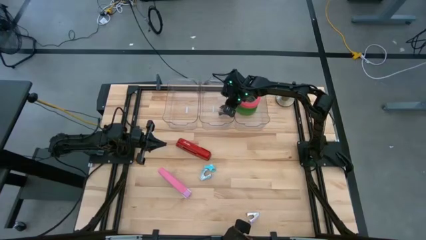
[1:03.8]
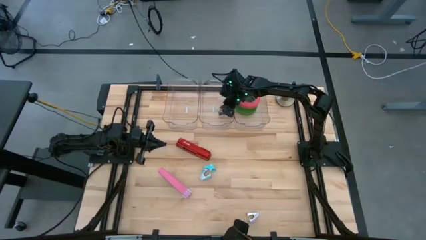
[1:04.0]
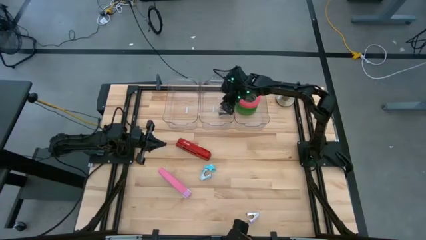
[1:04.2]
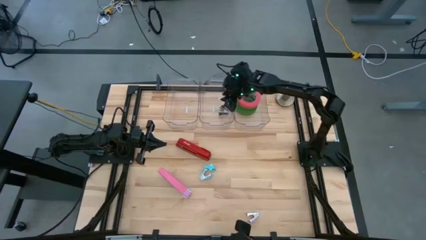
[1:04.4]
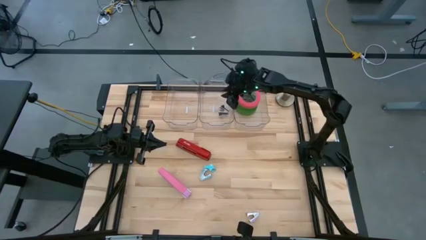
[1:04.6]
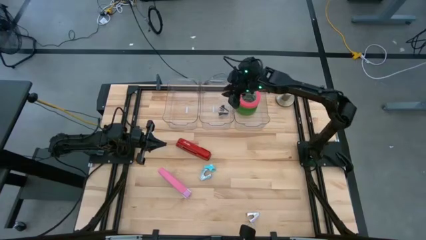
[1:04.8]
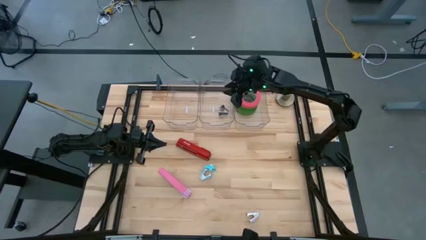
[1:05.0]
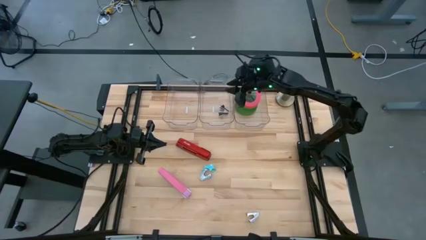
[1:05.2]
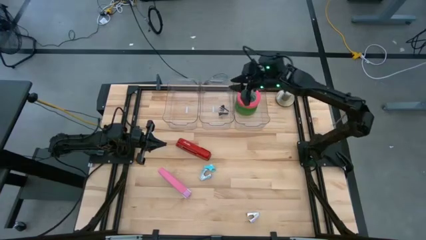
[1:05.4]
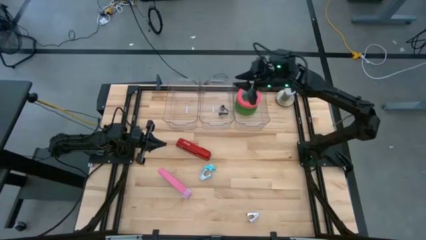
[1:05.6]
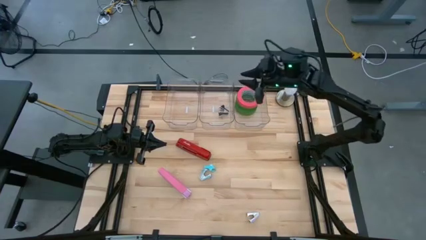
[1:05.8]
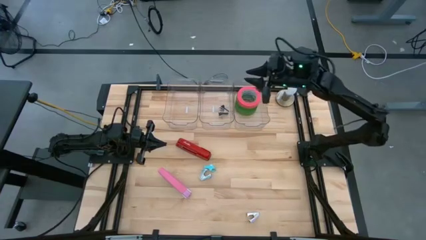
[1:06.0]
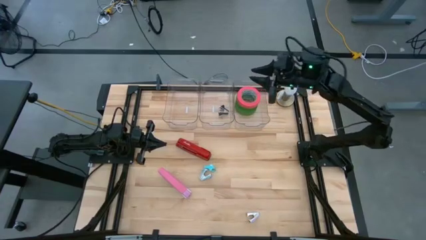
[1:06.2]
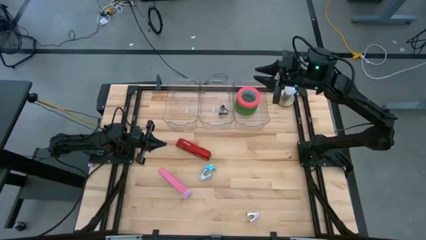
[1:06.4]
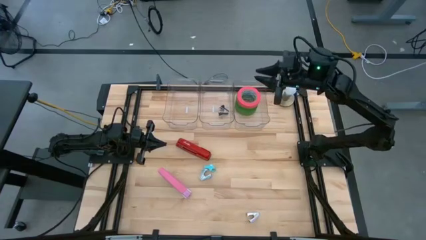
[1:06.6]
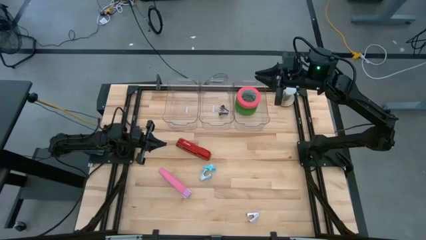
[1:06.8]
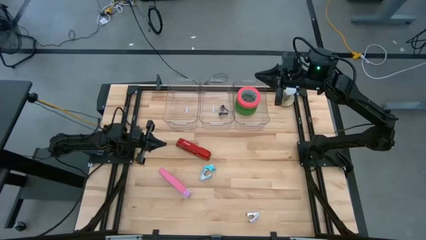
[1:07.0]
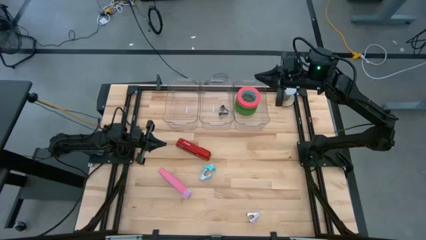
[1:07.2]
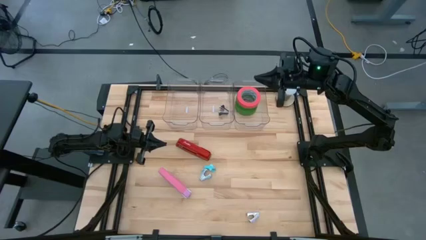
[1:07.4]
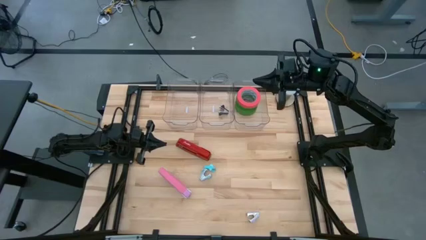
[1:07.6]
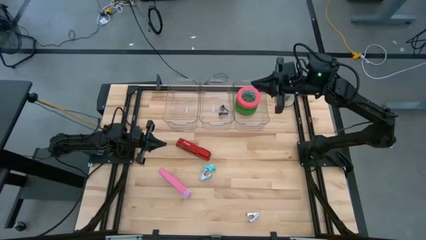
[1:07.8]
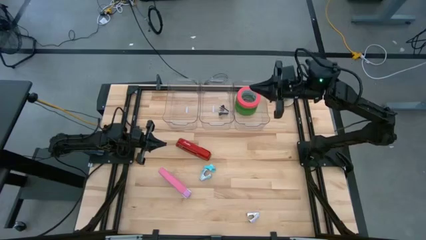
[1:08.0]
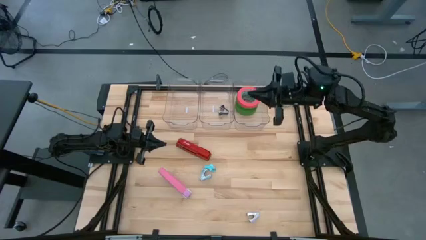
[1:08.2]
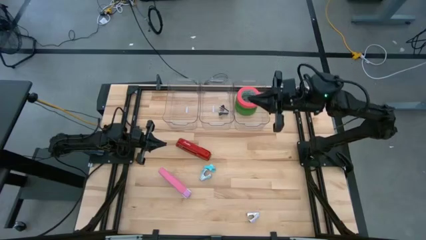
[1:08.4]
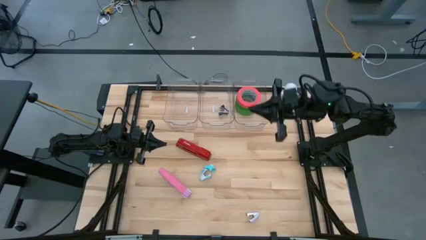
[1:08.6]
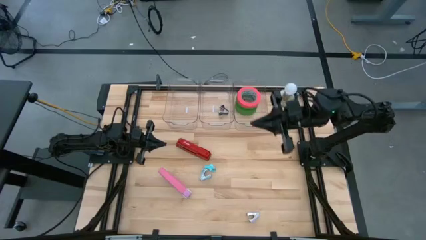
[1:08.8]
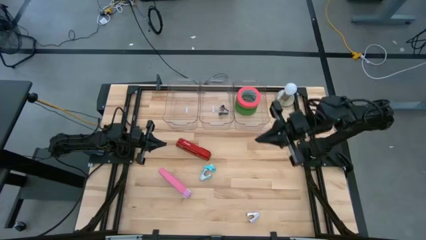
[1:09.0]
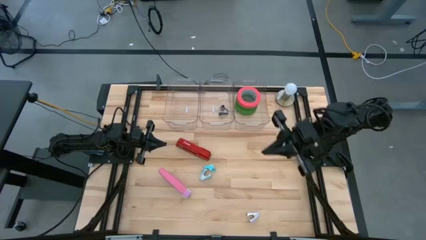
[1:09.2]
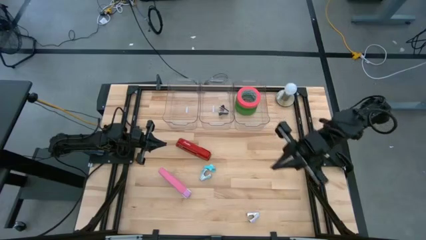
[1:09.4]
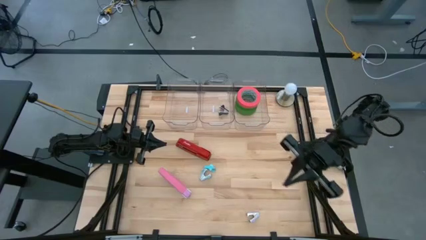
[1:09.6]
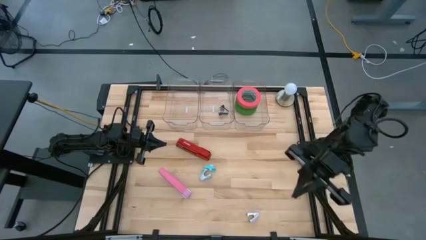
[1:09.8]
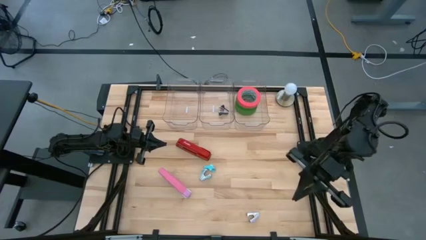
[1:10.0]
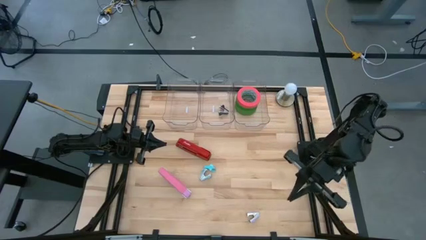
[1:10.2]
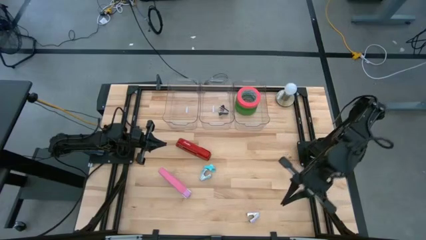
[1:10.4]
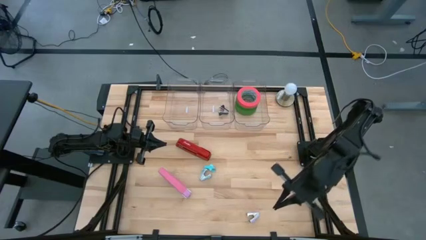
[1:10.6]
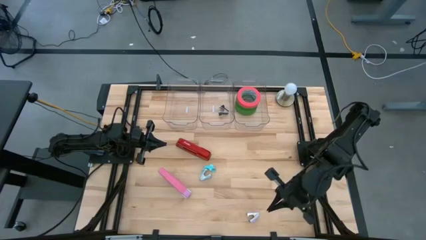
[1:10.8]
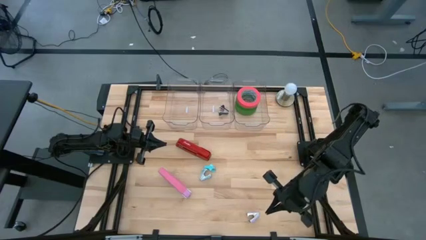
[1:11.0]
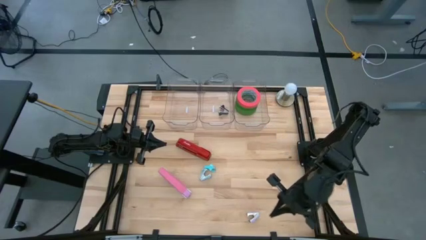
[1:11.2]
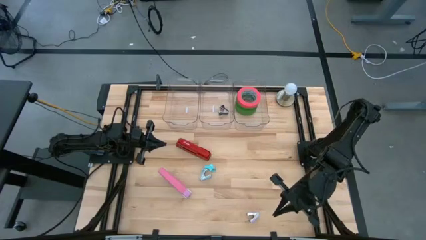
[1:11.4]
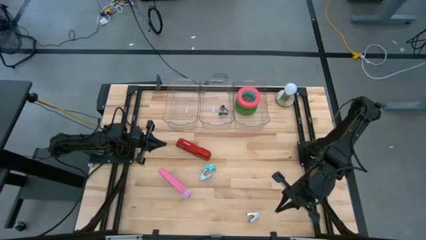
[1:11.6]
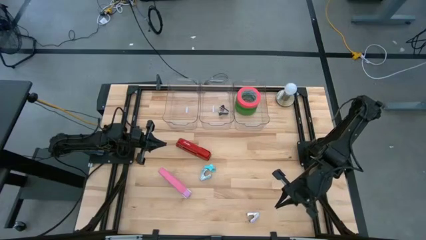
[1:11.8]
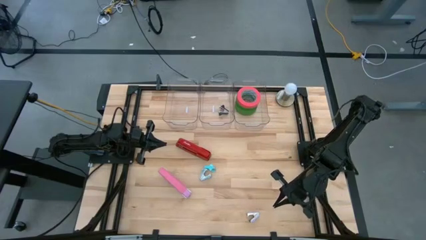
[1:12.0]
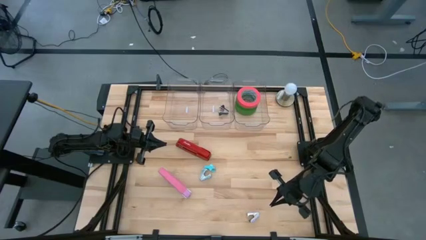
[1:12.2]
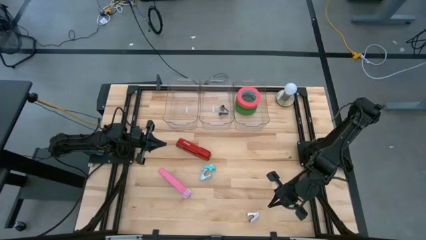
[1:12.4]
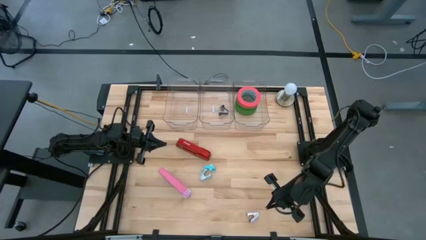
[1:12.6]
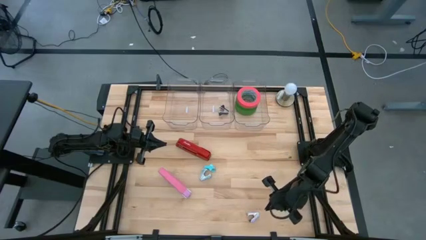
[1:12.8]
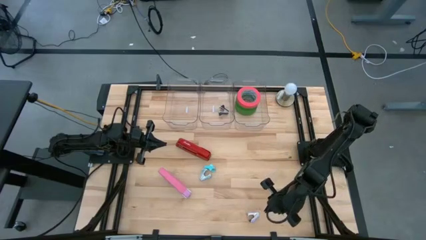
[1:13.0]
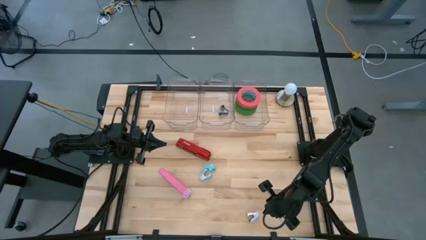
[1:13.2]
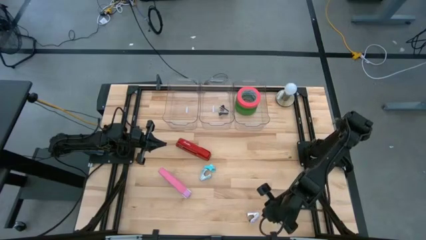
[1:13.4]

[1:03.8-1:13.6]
Task: Pick and place Stapler, Stapler remover, tape
Put the purple staple remover into the middle transparent bin

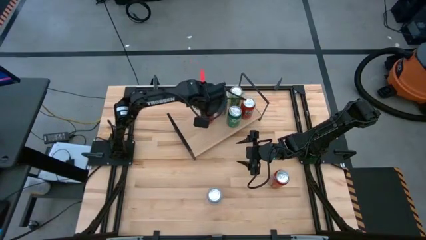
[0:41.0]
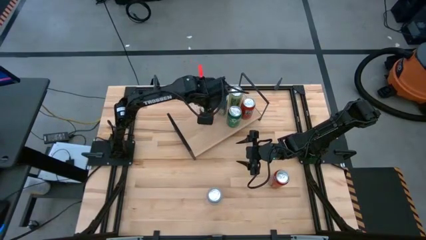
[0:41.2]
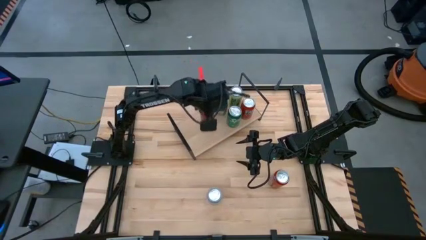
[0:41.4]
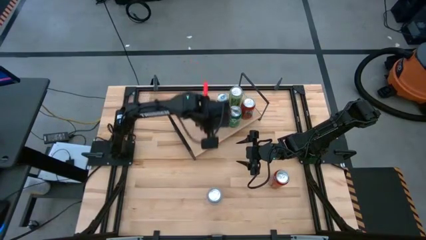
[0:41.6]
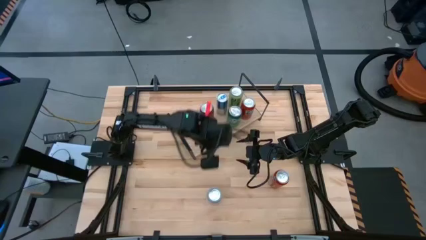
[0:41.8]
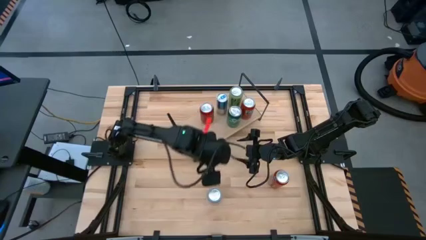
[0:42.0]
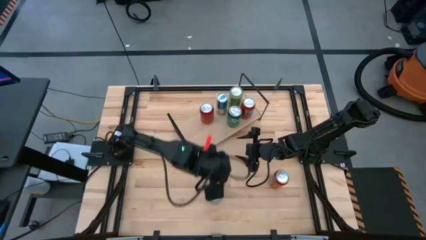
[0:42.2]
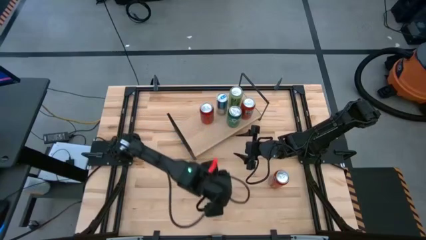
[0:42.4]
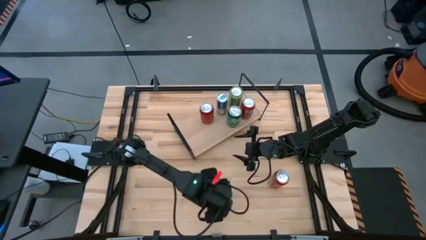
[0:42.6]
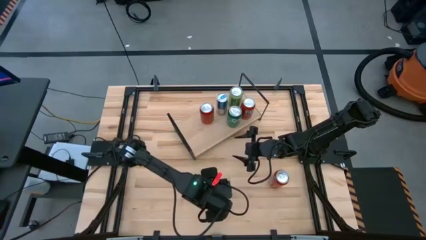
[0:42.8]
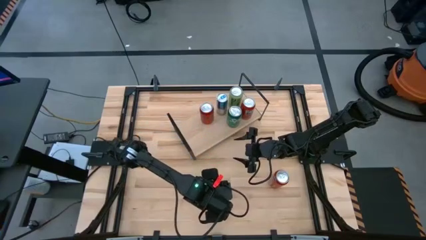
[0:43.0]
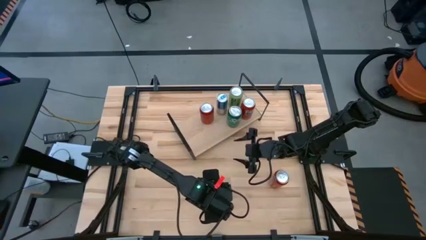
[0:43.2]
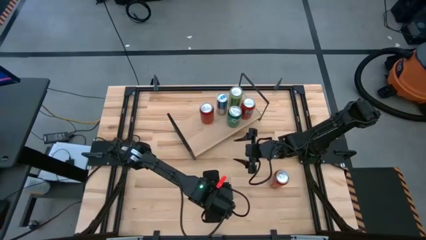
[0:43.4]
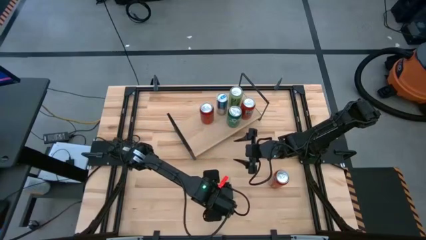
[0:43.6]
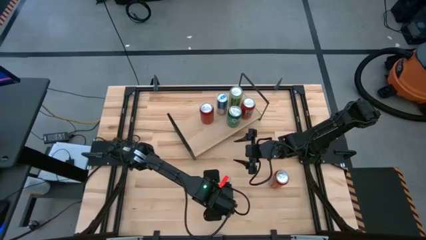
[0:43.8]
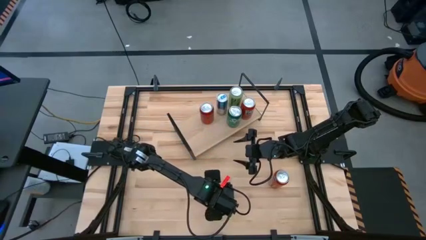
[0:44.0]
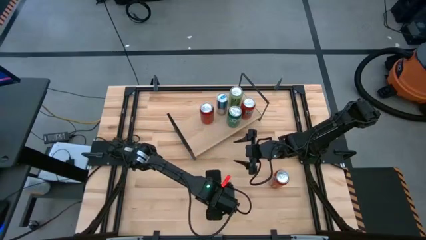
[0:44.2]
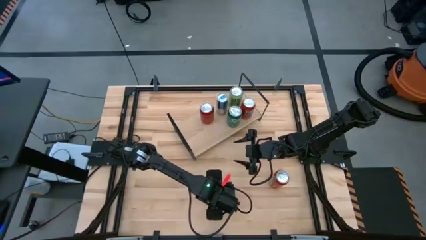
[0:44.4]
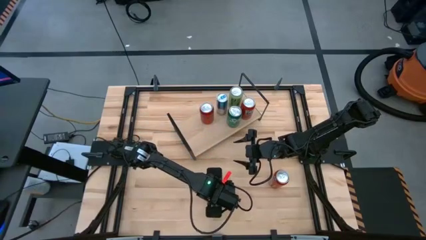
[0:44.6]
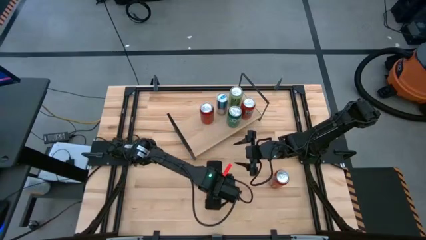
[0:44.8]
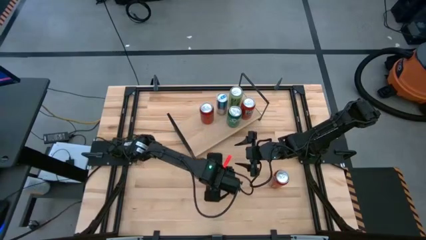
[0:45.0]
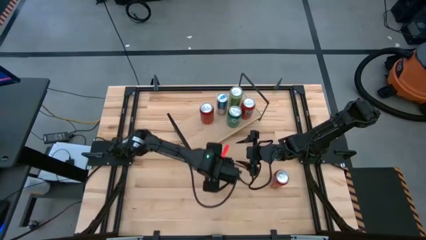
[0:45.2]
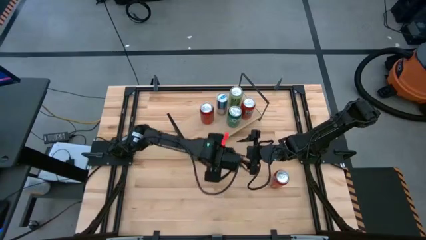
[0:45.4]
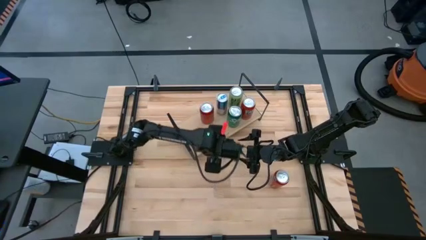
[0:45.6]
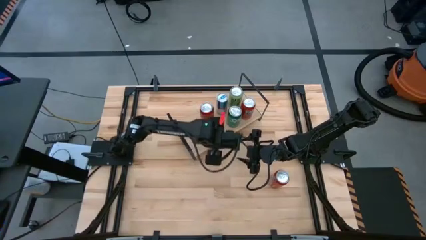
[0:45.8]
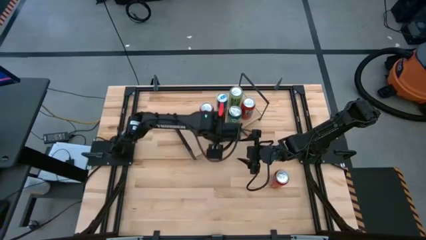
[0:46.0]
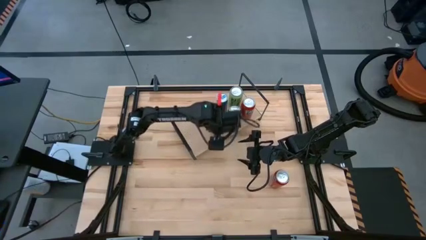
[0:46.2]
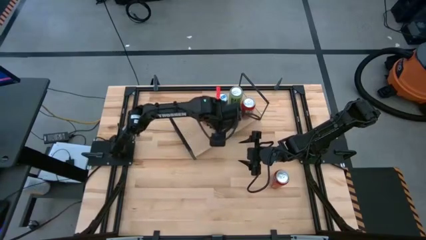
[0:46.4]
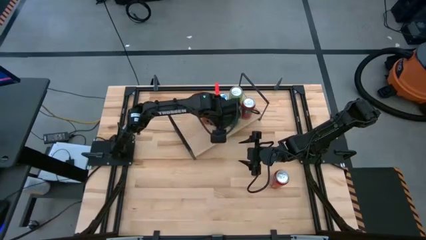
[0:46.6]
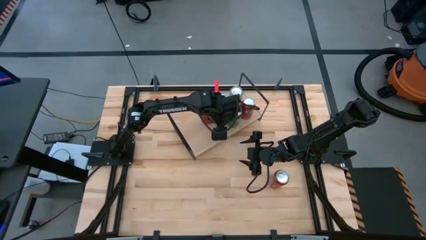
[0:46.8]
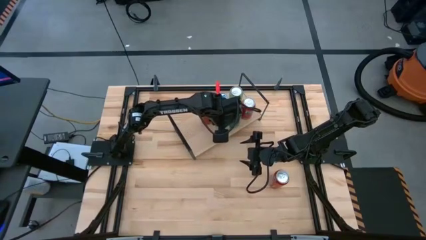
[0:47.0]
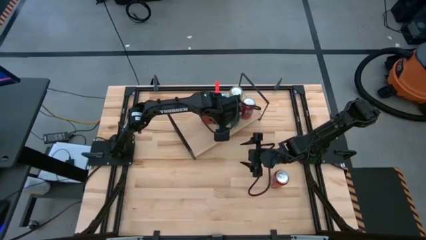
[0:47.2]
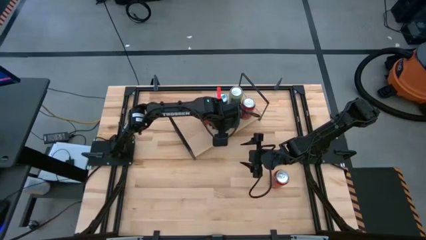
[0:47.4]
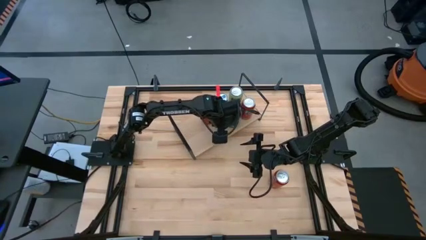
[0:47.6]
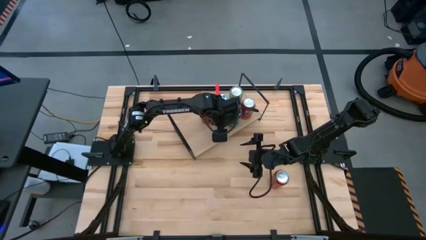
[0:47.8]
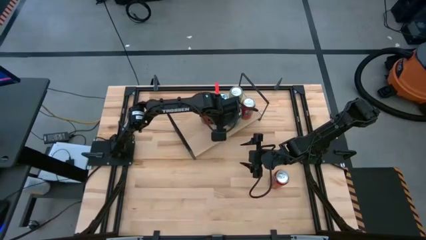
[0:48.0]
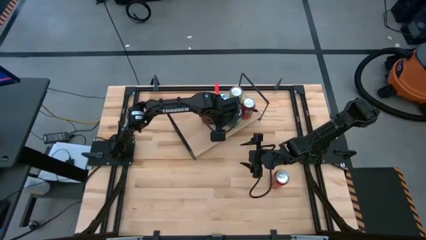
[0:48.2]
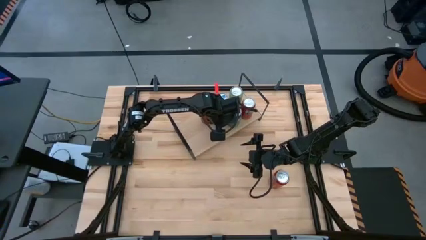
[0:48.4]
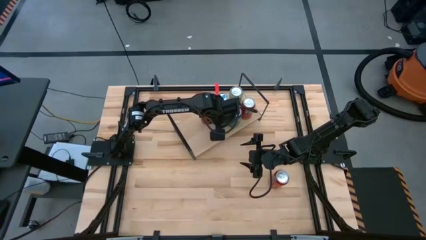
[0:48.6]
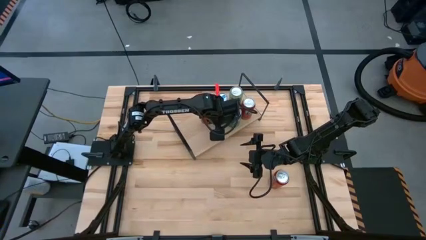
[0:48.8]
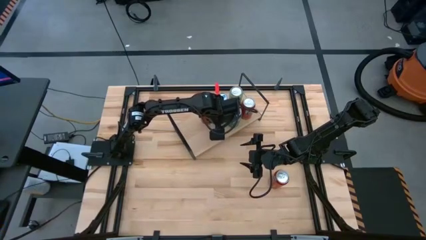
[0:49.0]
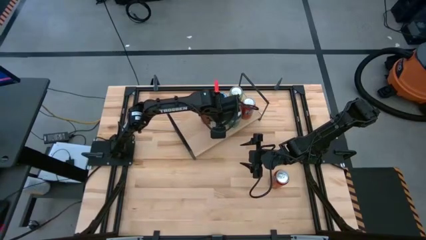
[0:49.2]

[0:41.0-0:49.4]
Task: Place canned beverage on shelf
Put the white and orange soda can on the shelf aligned with the red soda can
